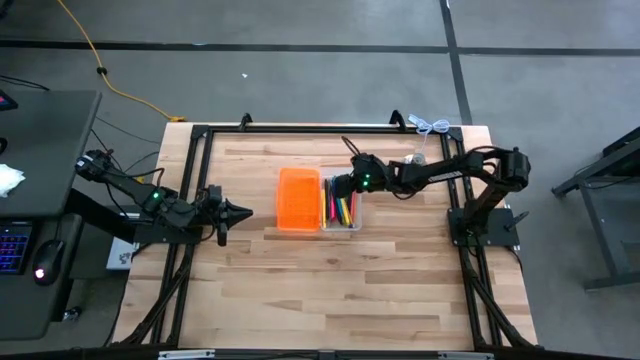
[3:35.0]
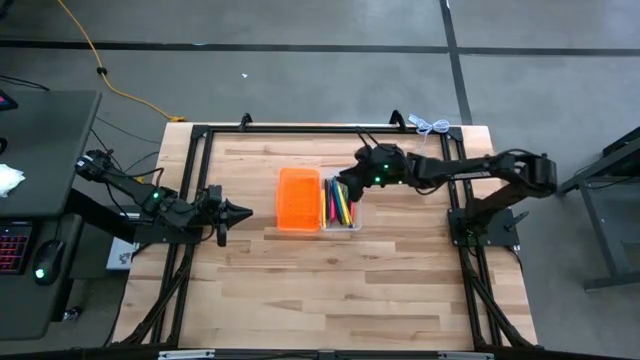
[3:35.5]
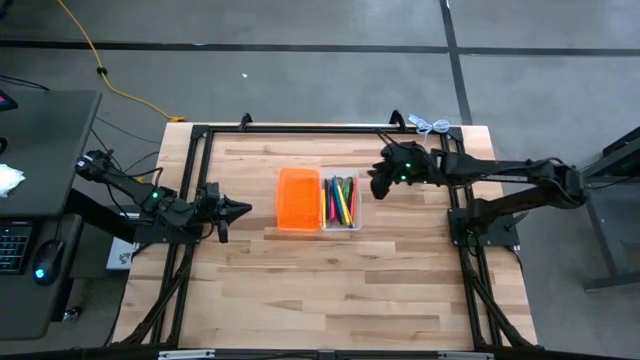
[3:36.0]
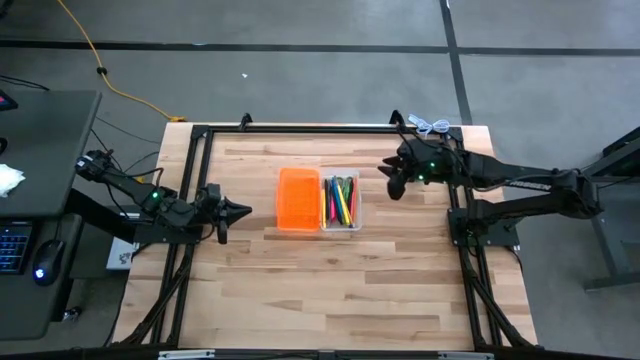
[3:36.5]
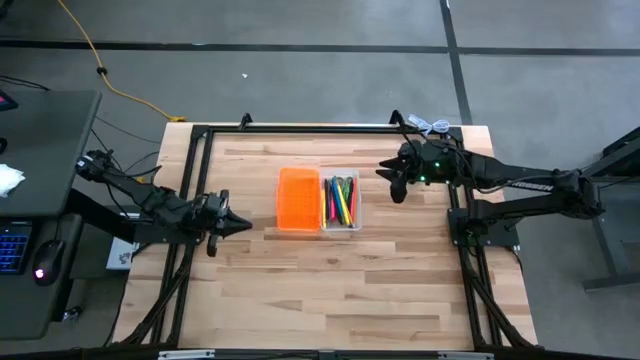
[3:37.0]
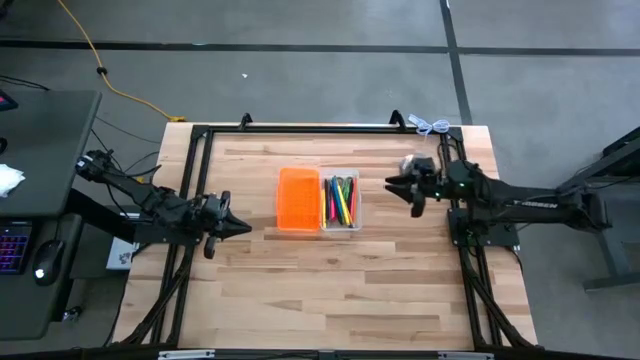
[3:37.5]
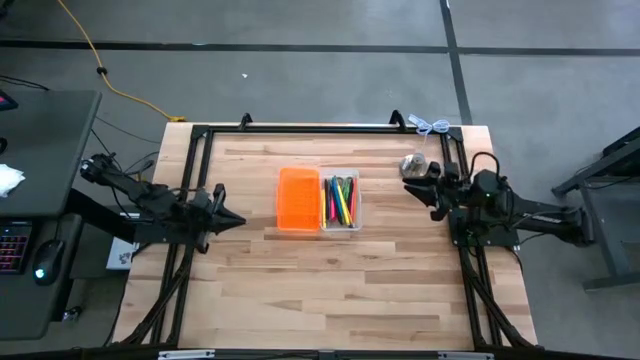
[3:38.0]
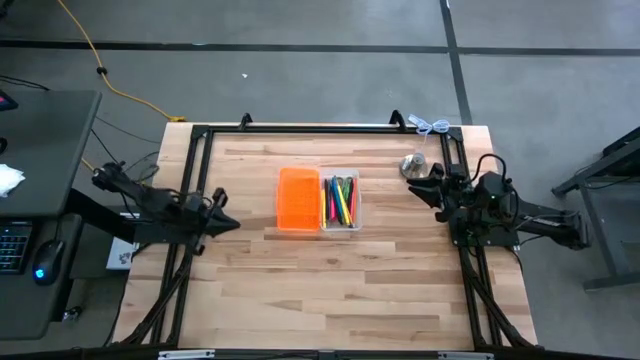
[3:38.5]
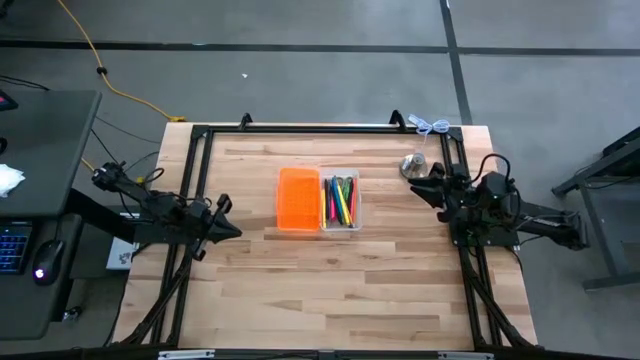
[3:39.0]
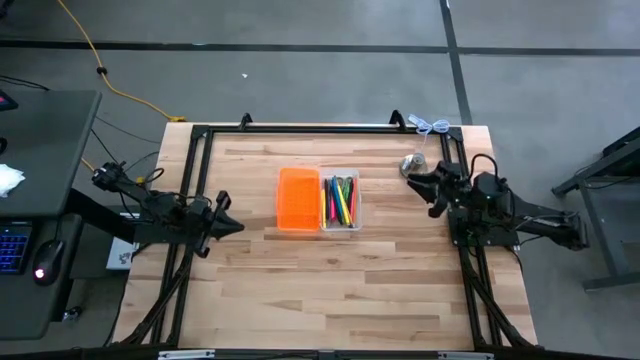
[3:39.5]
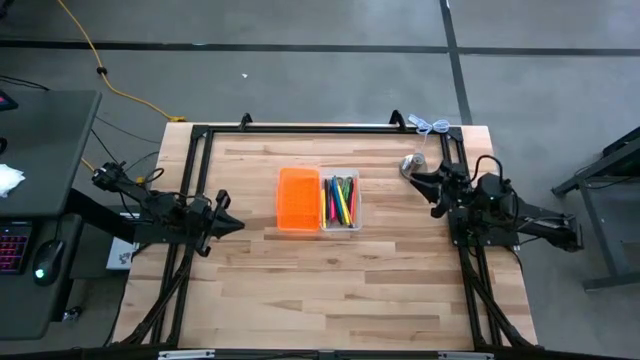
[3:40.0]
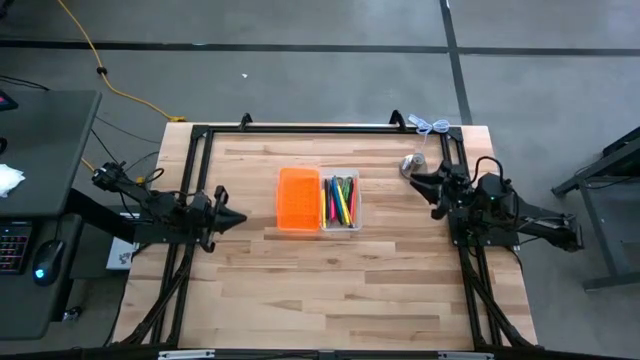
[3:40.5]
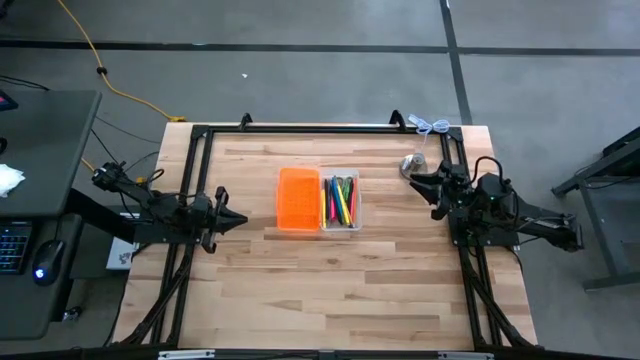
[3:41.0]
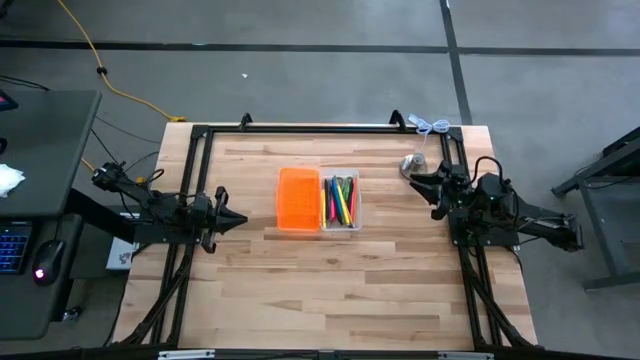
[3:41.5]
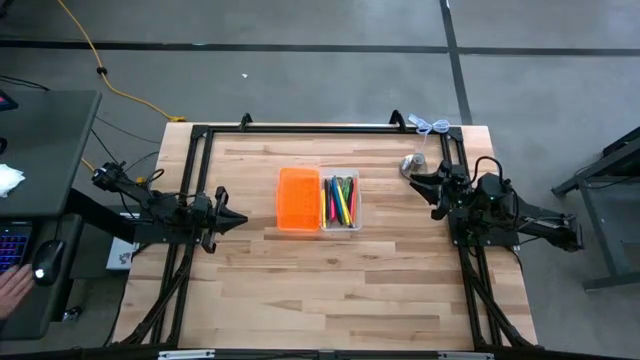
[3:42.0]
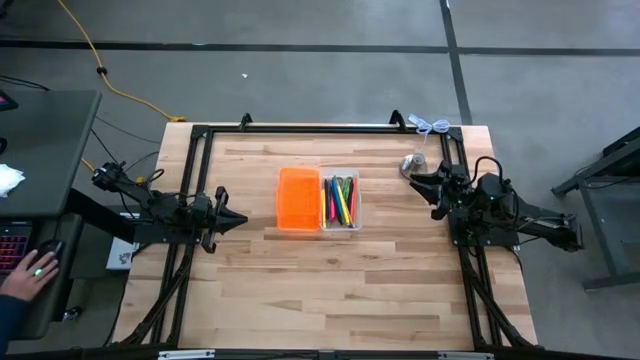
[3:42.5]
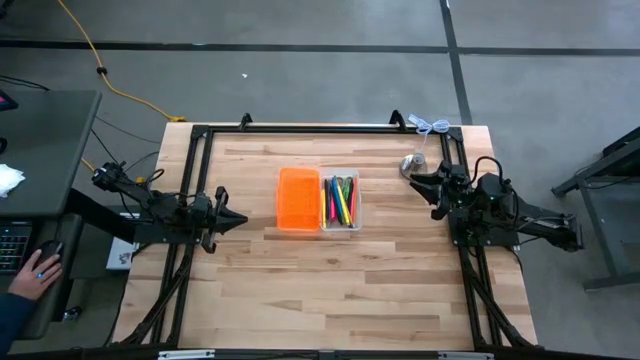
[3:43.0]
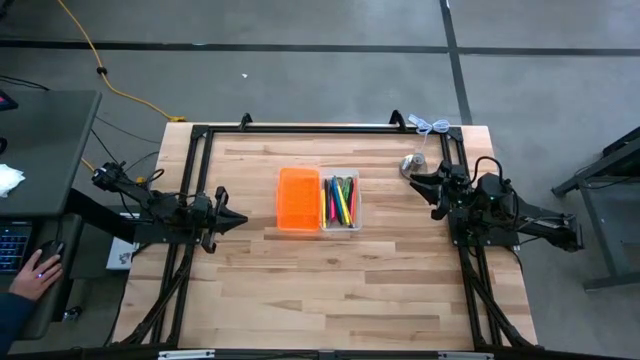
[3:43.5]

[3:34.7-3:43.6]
Task: Pick & place school supplies into a supply box
Return to Home Position

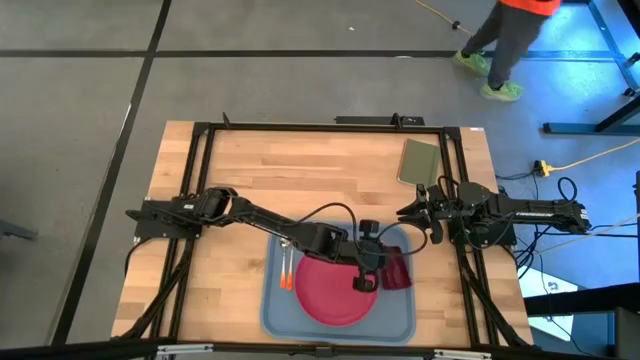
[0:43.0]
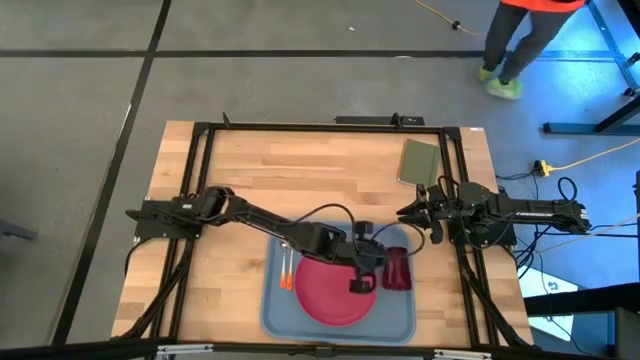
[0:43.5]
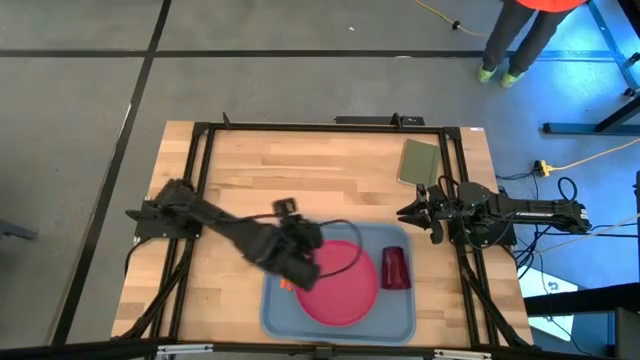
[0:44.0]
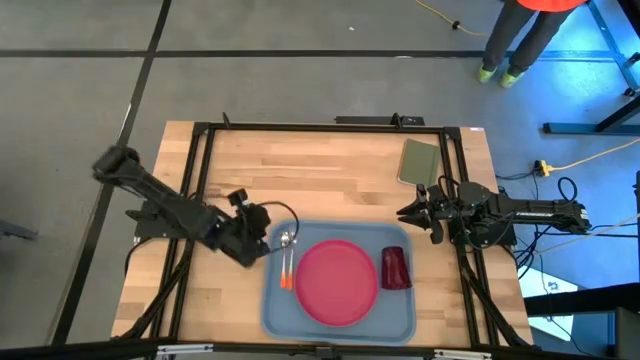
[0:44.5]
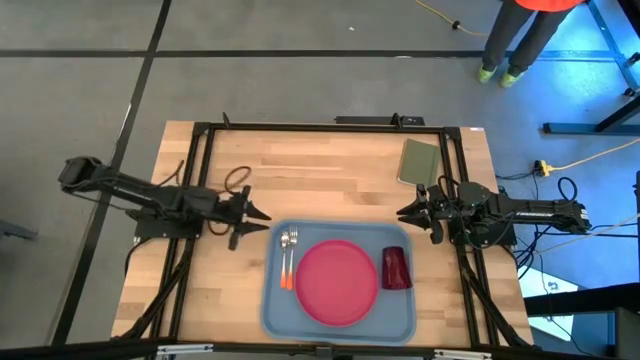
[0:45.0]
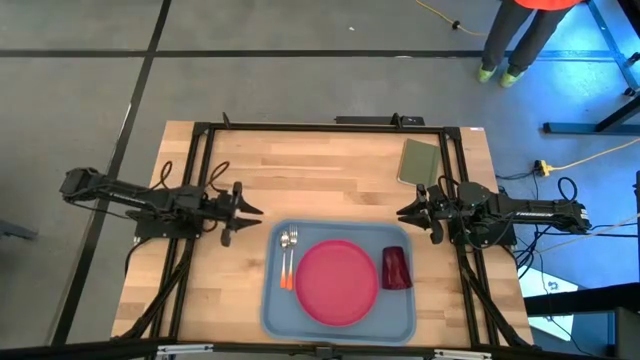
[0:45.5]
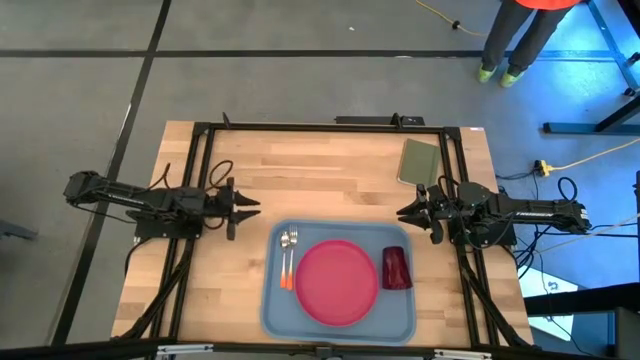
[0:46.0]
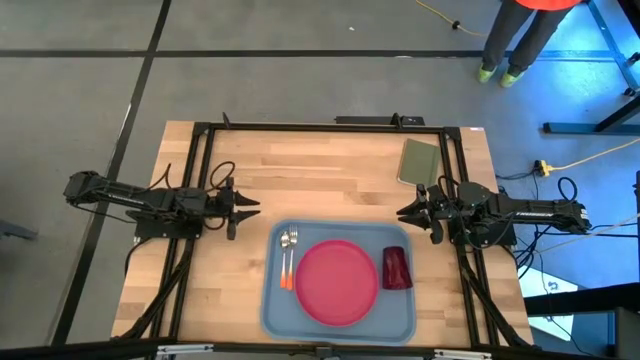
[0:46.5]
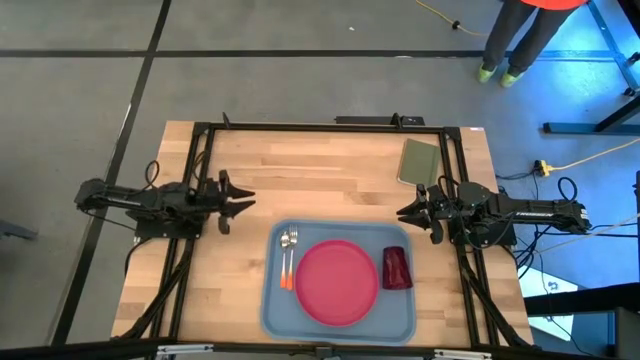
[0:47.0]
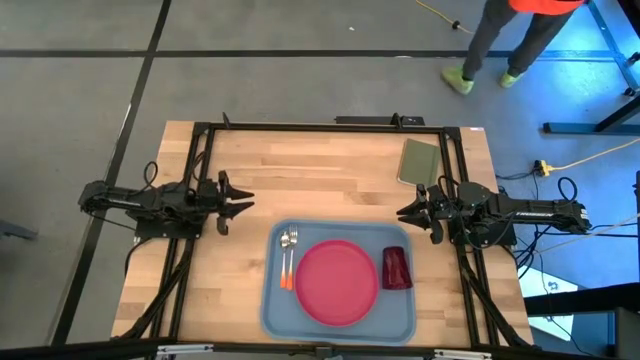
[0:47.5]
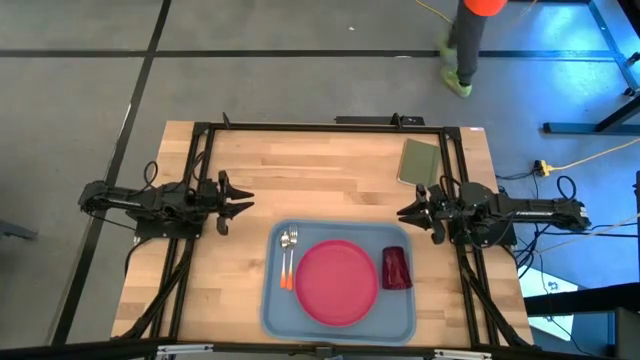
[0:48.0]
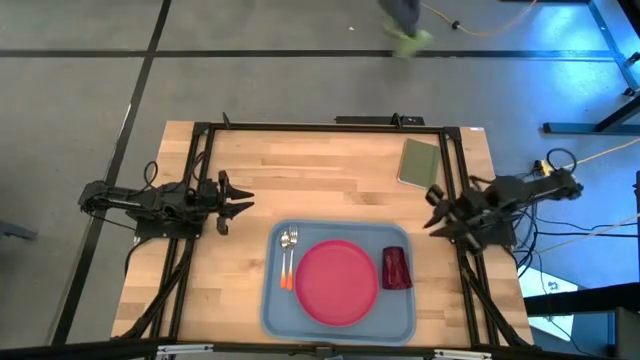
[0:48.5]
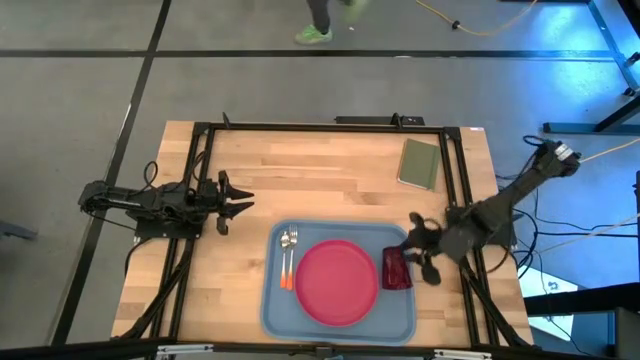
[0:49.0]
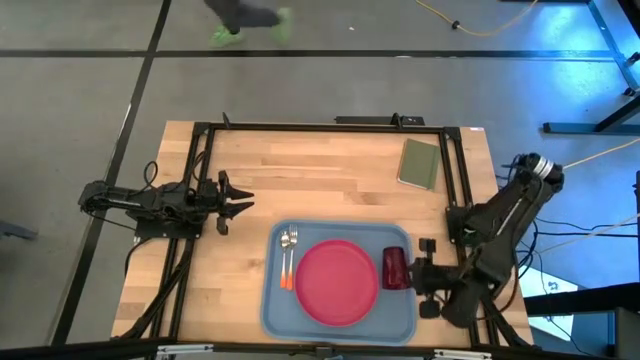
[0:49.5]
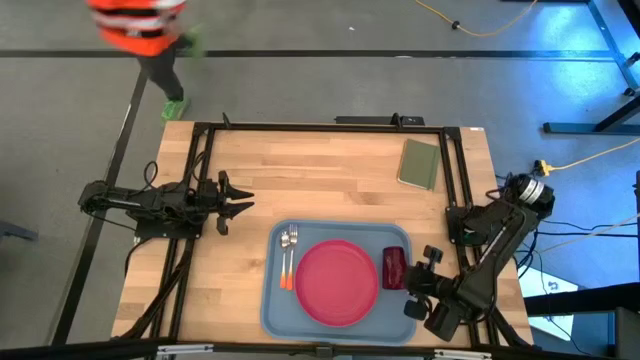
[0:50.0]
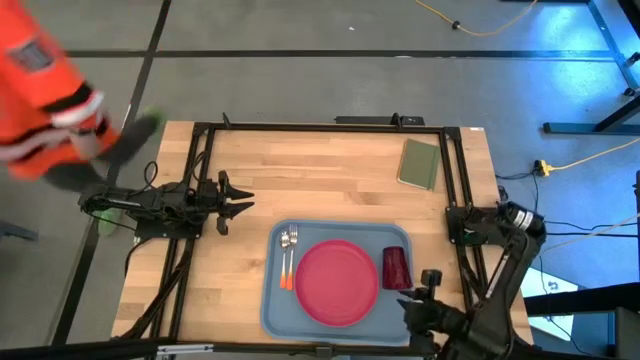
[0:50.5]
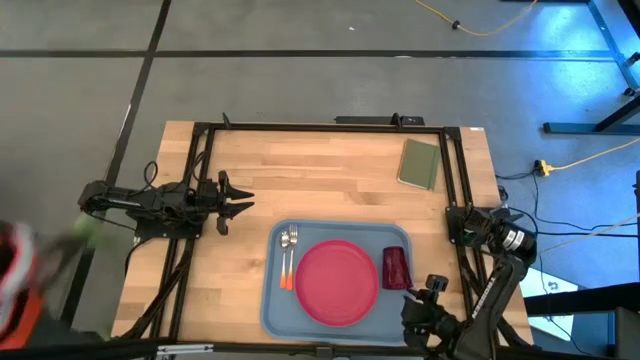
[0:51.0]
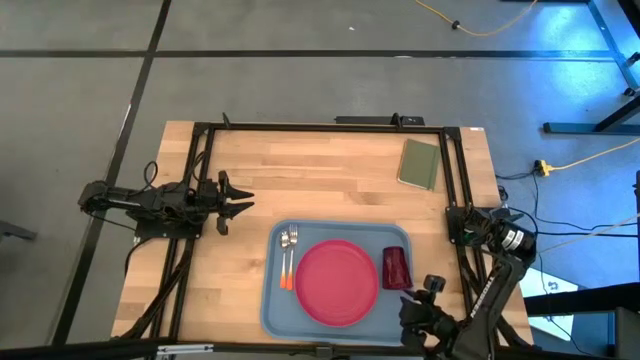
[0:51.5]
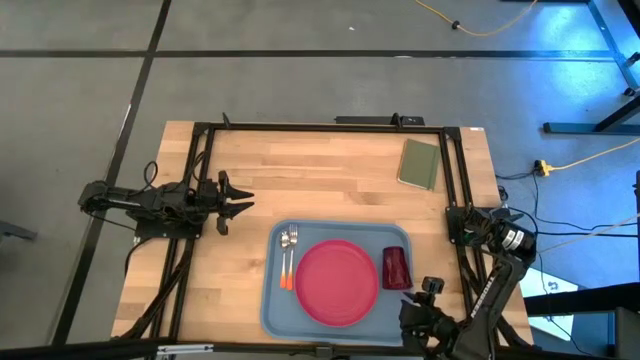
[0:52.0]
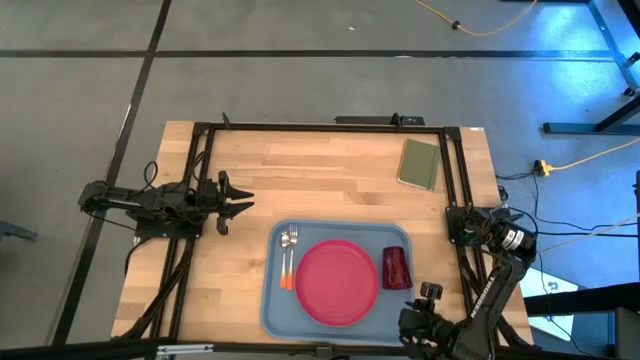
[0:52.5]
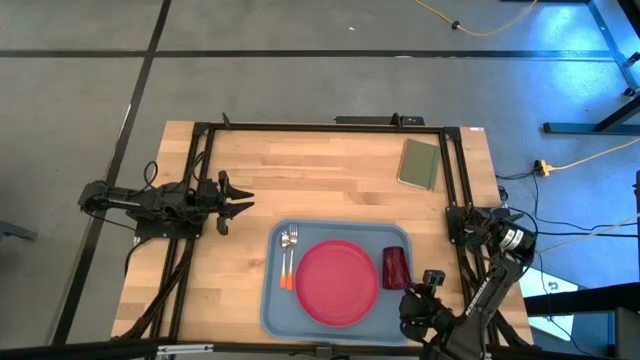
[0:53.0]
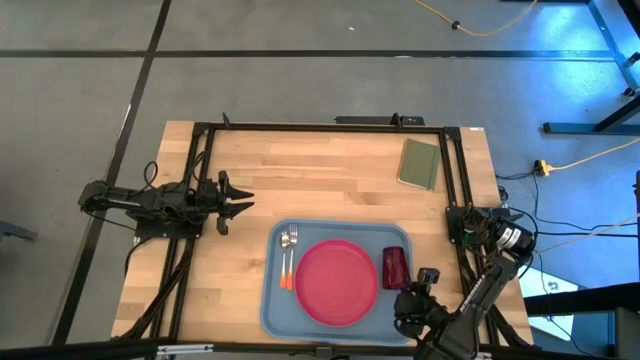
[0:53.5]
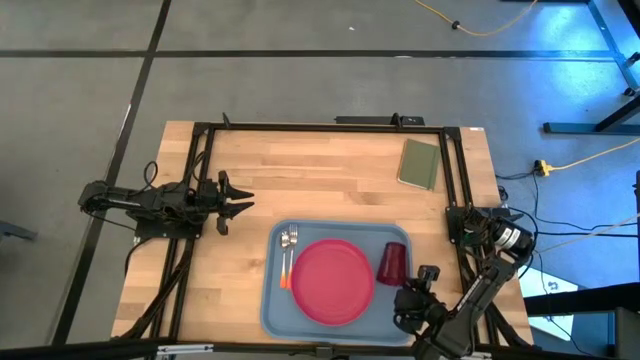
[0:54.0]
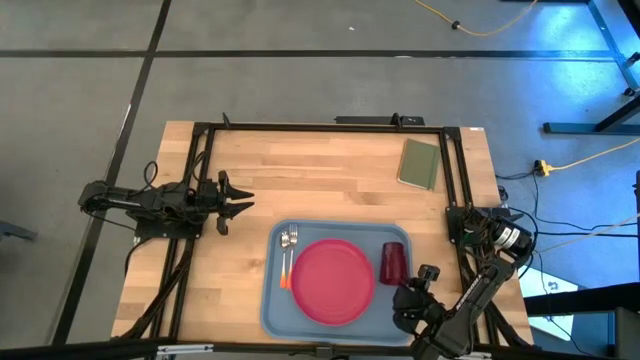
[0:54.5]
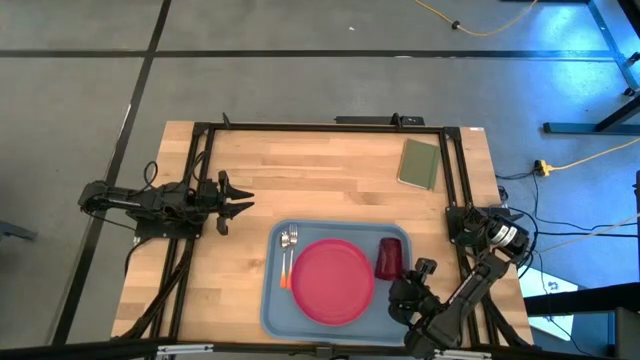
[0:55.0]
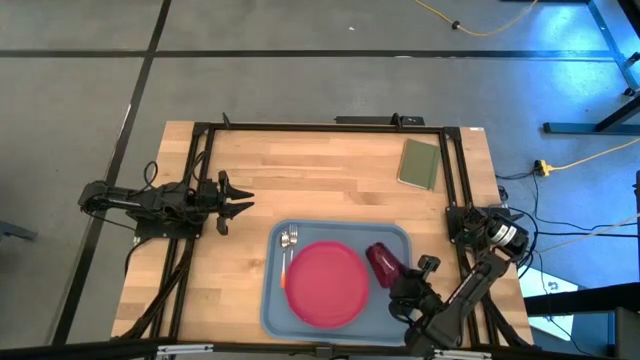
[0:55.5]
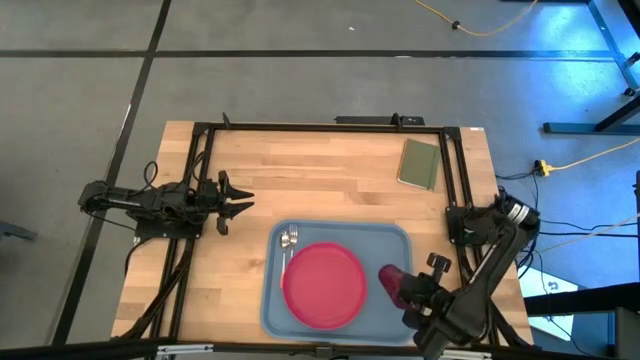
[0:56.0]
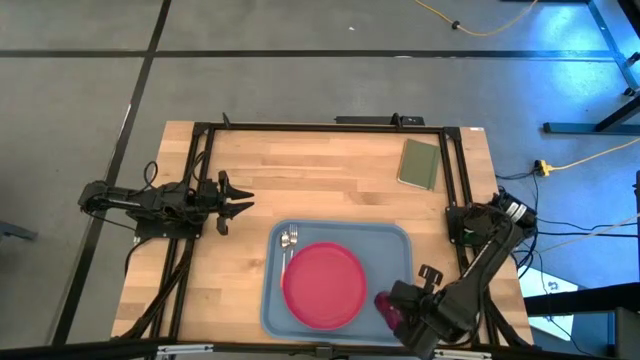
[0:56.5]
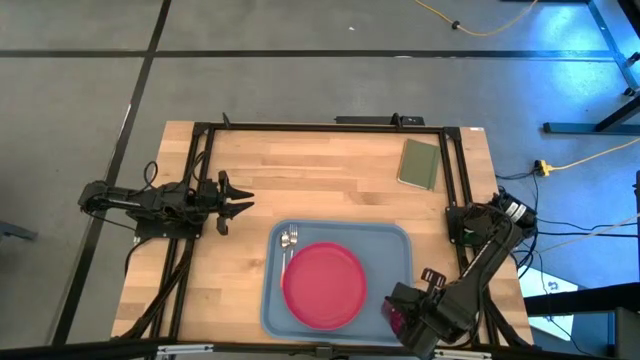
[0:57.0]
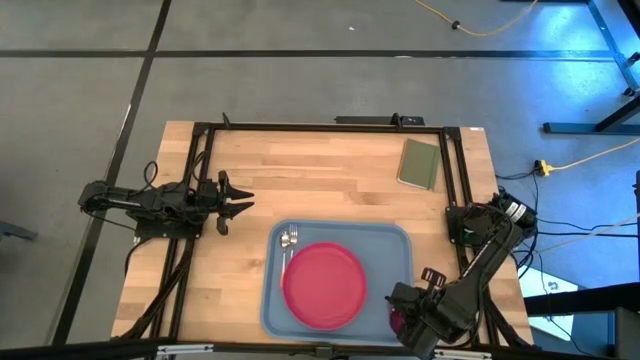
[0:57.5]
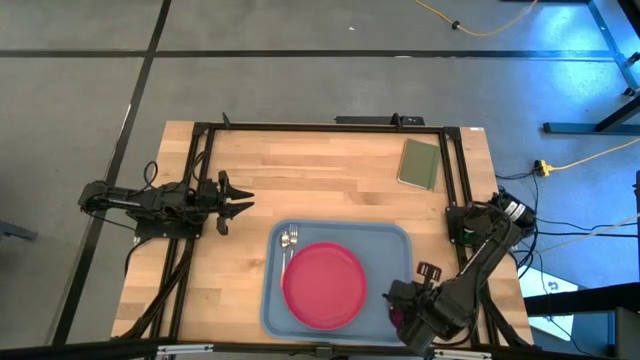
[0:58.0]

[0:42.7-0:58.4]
Task: Pick and place plate/cup/fork/spoon on tray
Put the red cup on the right of the blue tray
